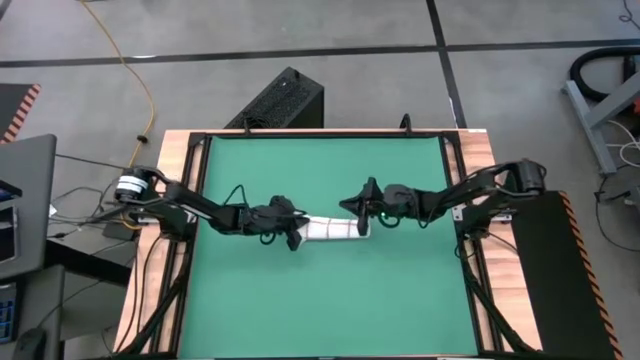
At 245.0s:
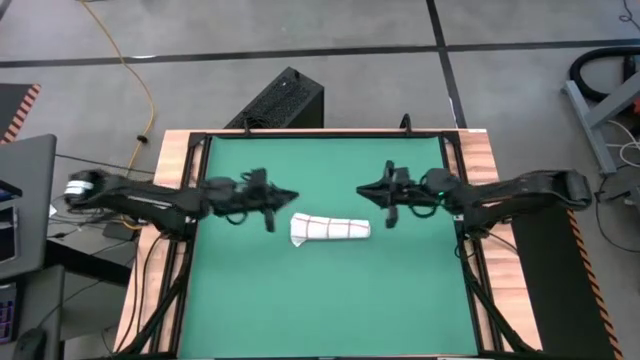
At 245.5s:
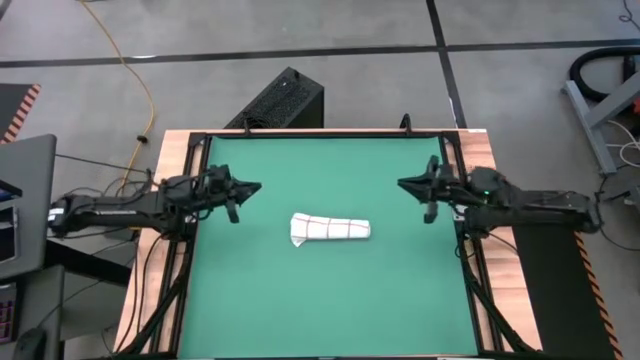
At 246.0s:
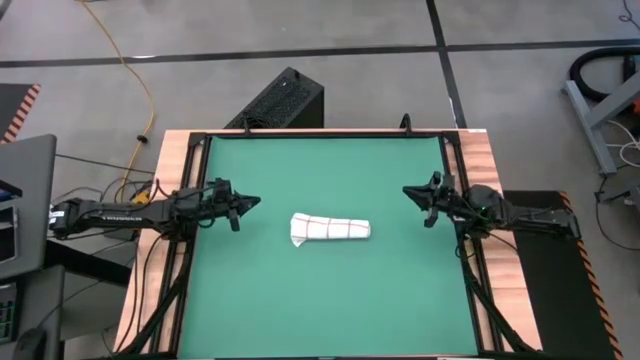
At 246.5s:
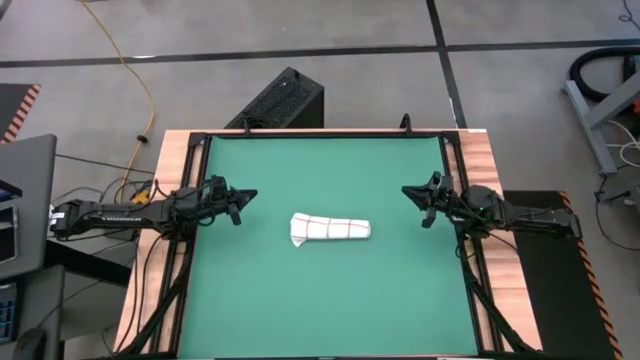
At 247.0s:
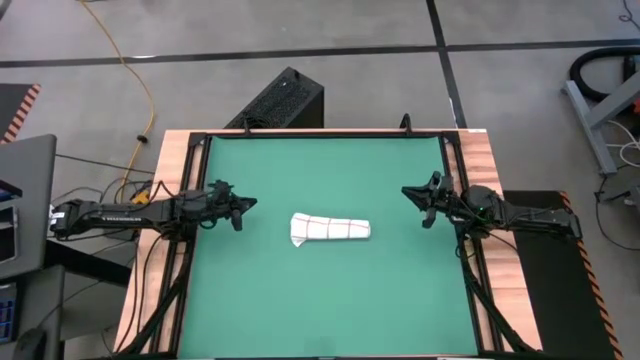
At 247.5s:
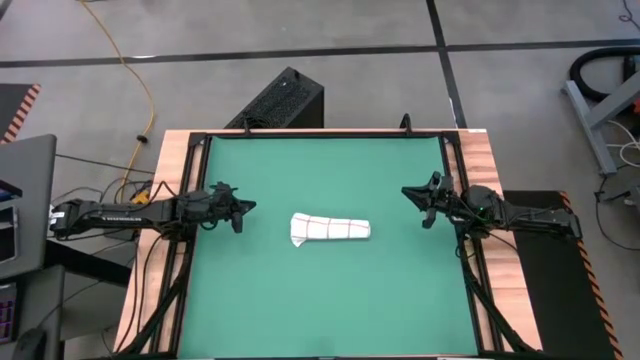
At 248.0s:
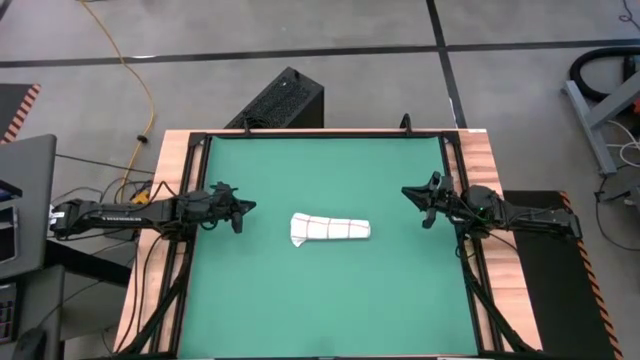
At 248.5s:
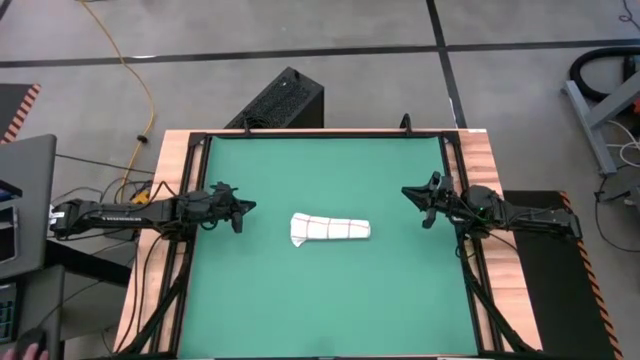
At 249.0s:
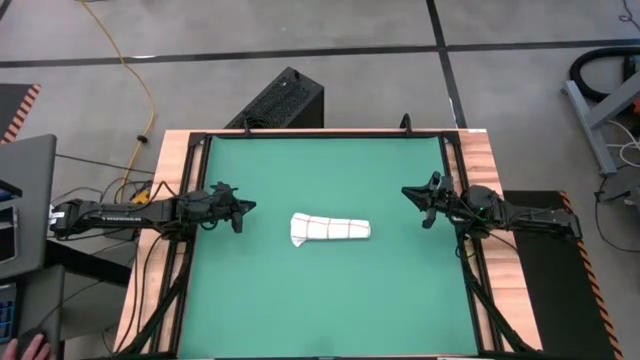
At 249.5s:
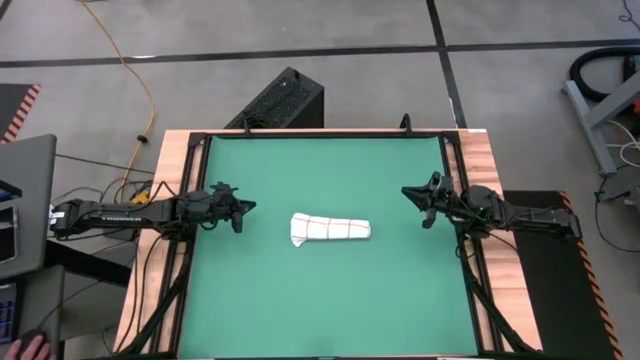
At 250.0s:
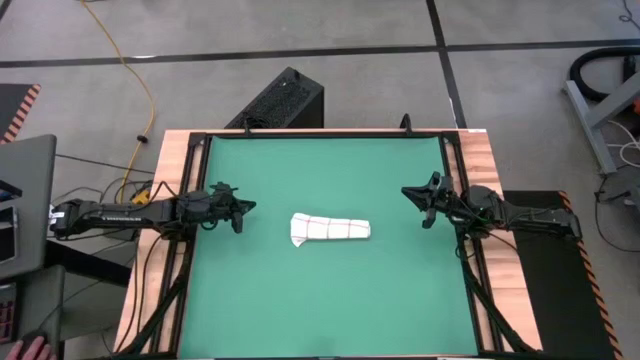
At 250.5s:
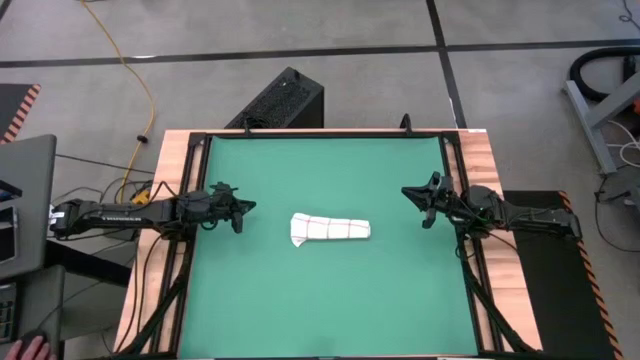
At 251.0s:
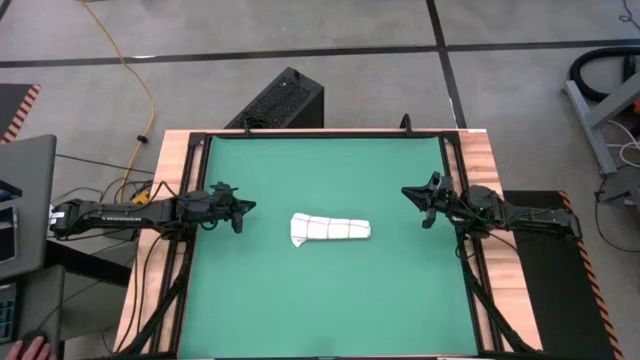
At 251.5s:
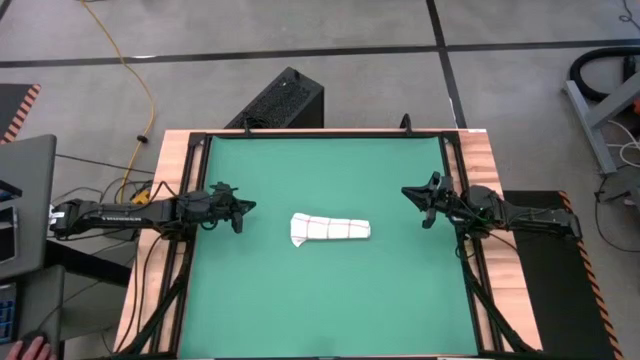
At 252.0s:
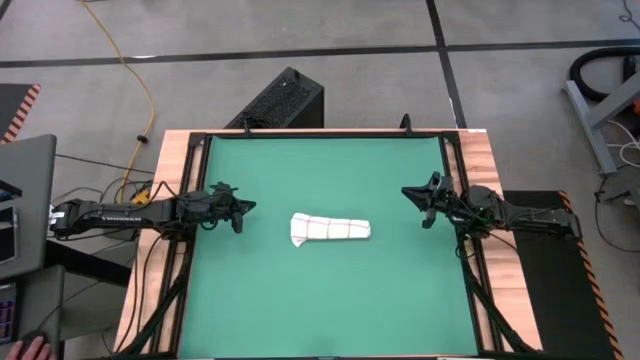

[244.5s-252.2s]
Task: Roll towel into tight, uniform cylinder
Return to Home Position

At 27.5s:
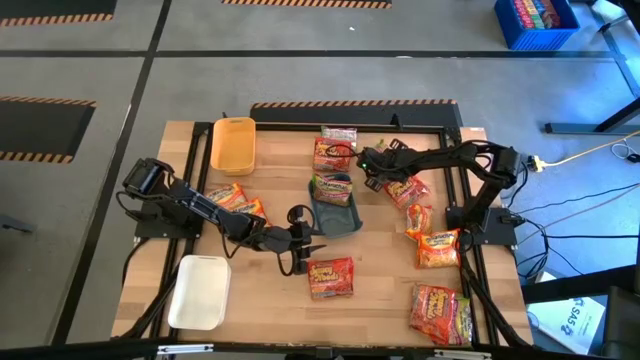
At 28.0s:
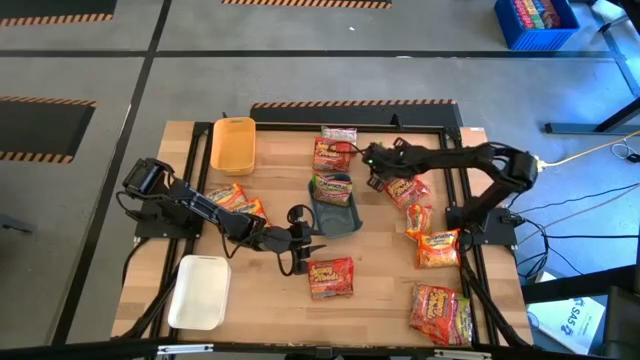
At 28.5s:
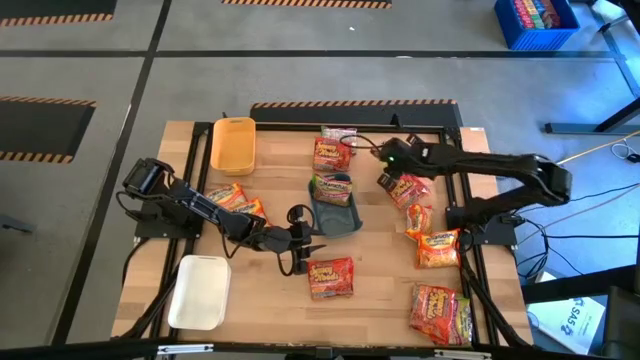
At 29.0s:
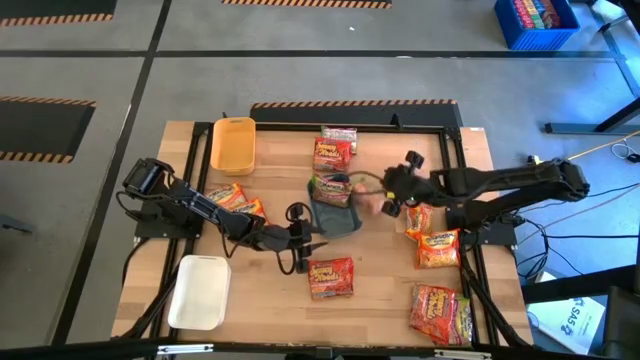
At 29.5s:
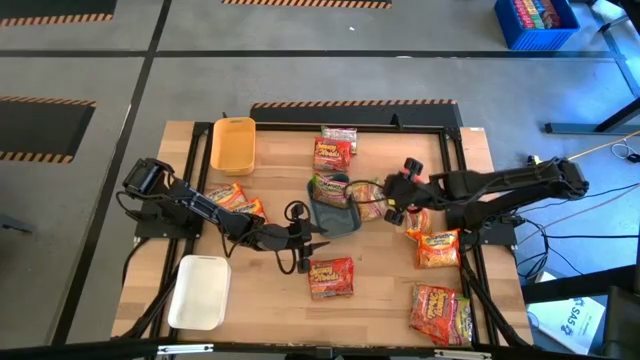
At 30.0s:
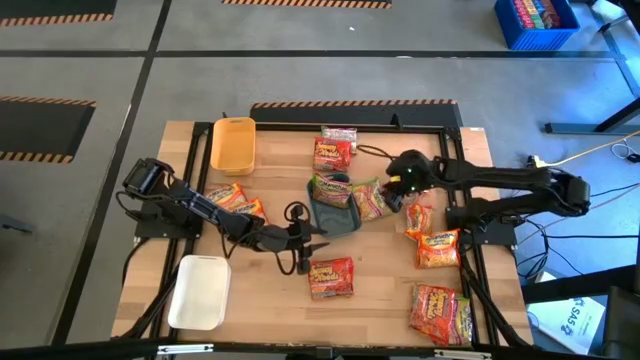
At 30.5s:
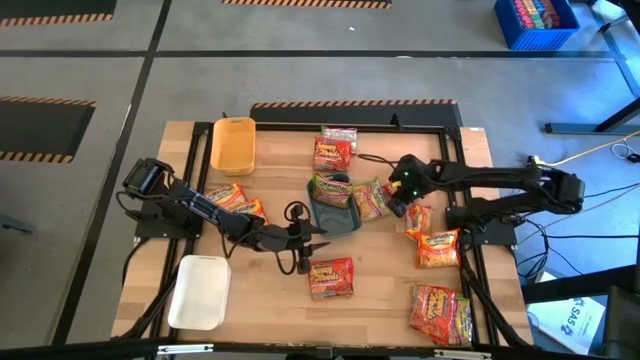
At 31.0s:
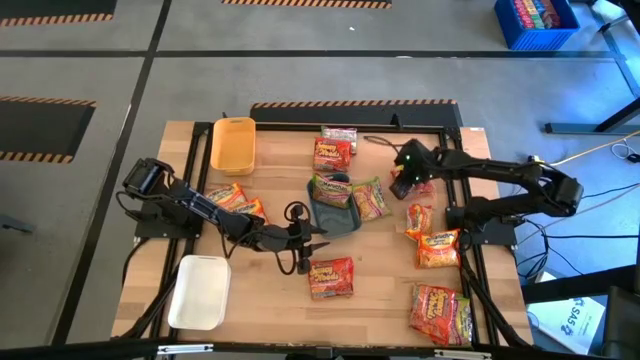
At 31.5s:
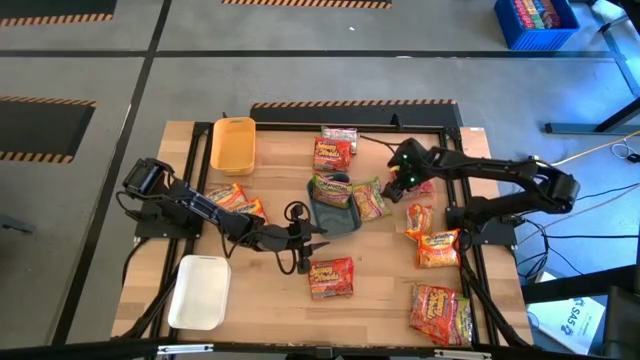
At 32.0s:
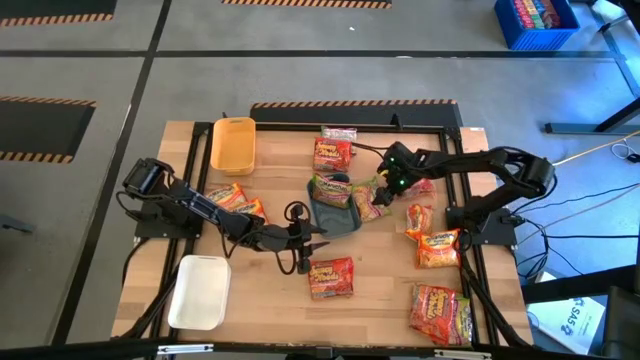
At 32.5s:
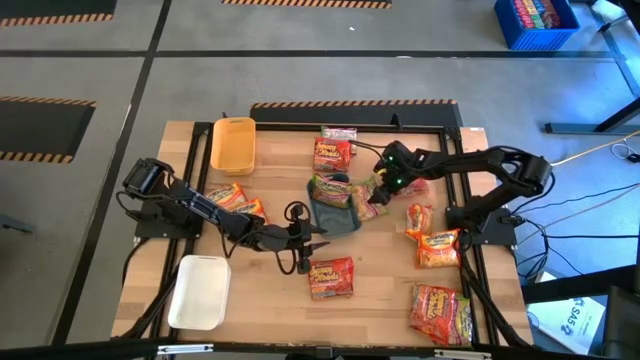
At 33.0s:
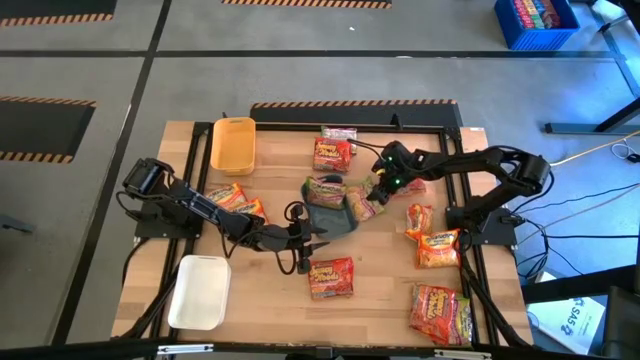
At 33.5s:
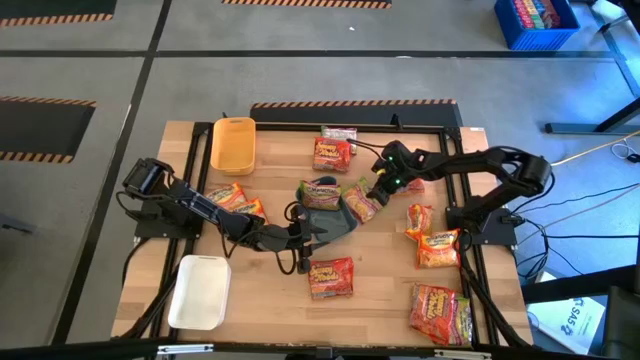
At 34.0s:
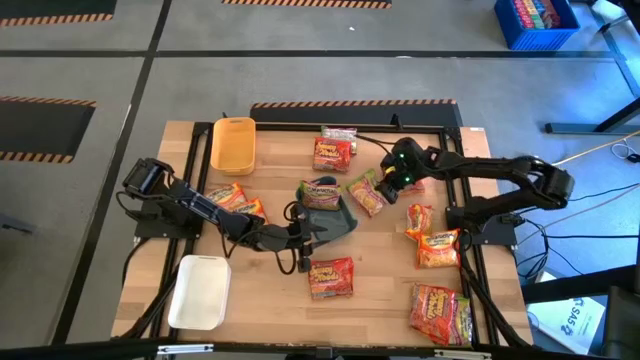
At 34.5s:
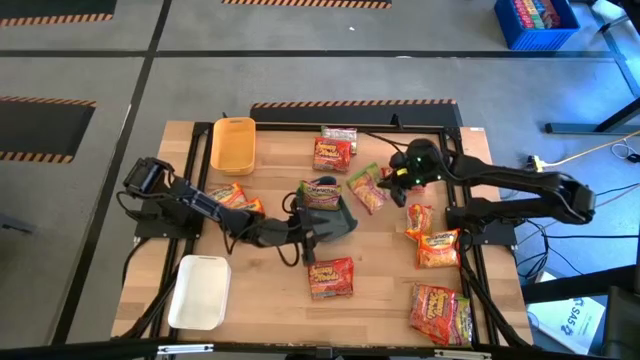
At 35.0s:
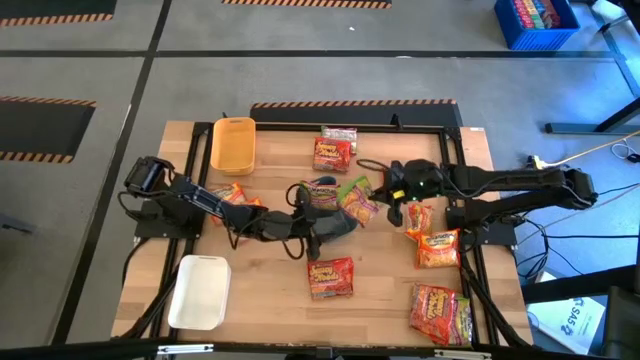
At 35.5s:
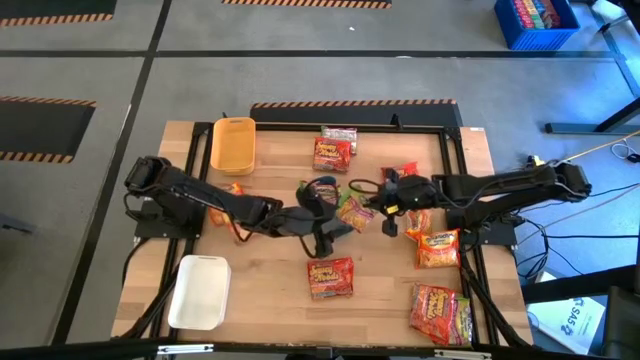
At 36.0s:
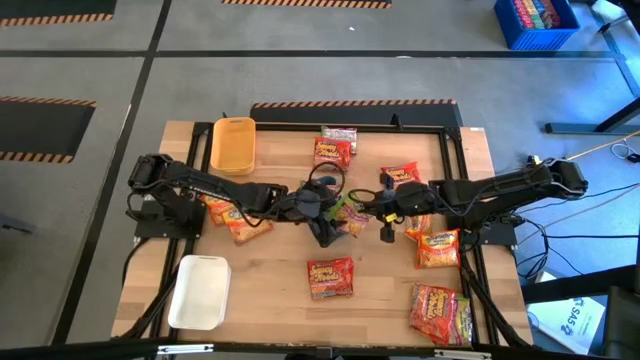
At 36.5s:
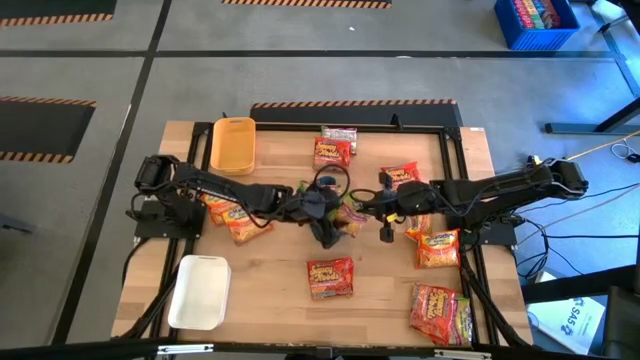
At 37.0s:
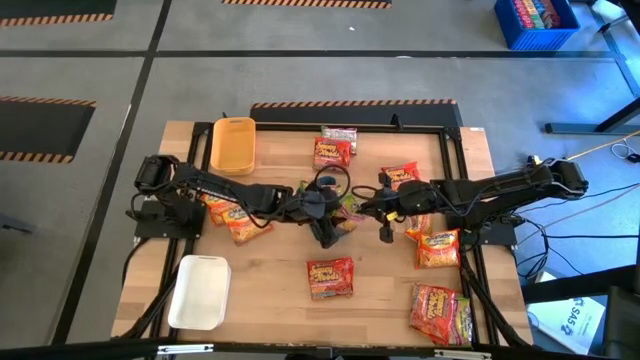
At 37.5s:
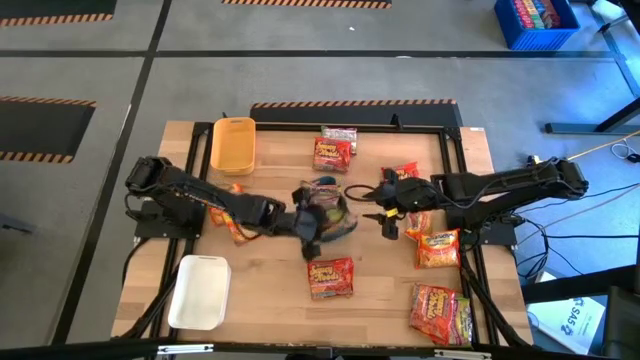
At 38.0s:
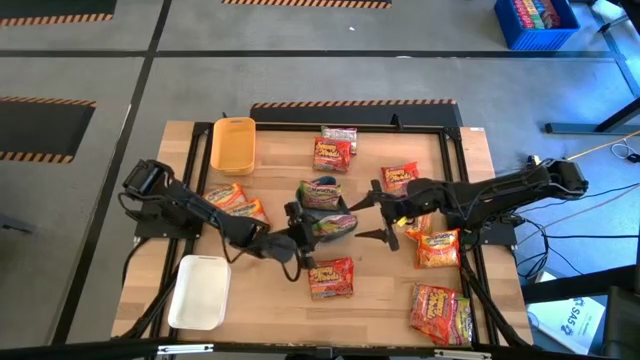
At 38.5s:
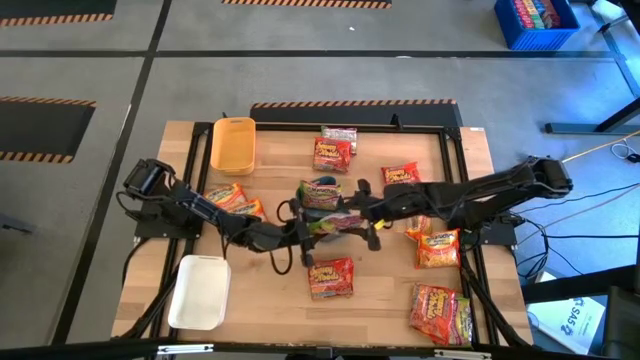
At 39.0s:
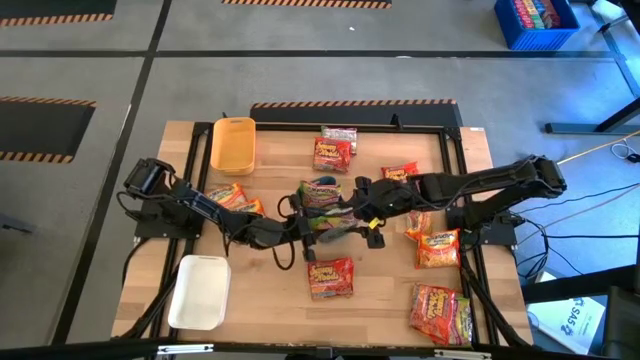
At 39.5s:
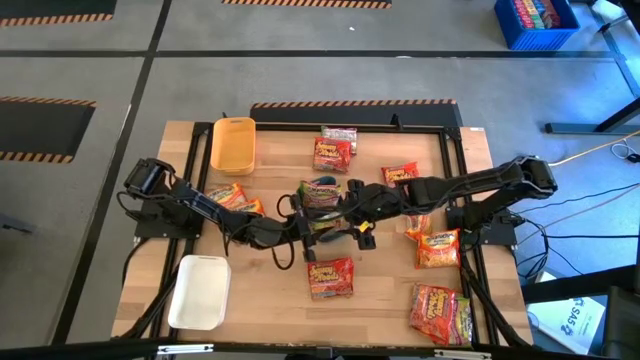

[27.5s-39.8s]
Task: Sort Maruchan noodles
Put the green noodles into the blue bin
